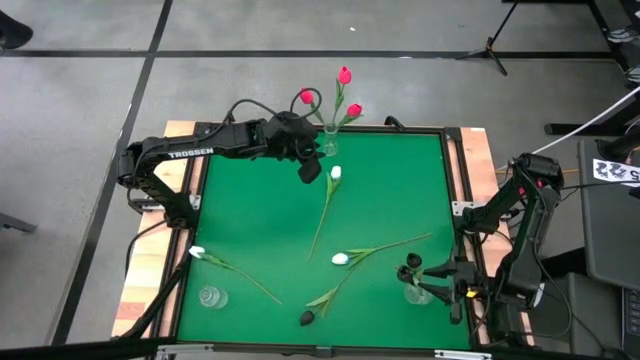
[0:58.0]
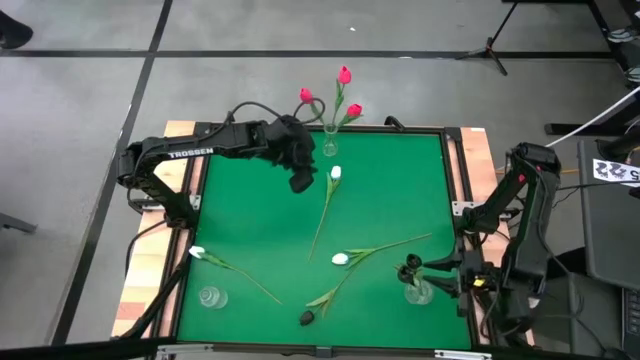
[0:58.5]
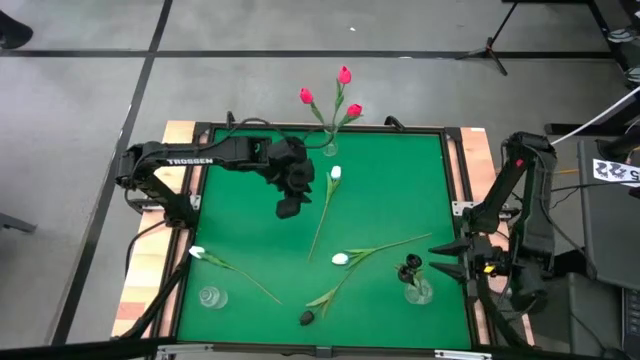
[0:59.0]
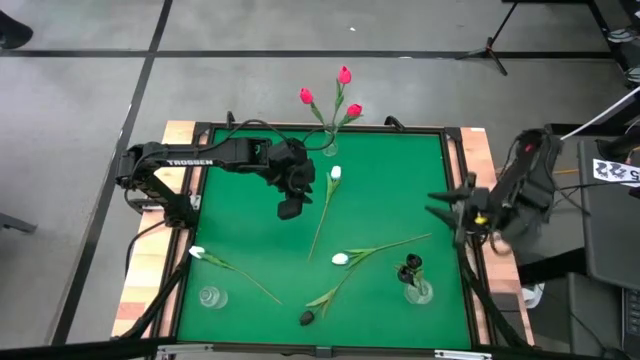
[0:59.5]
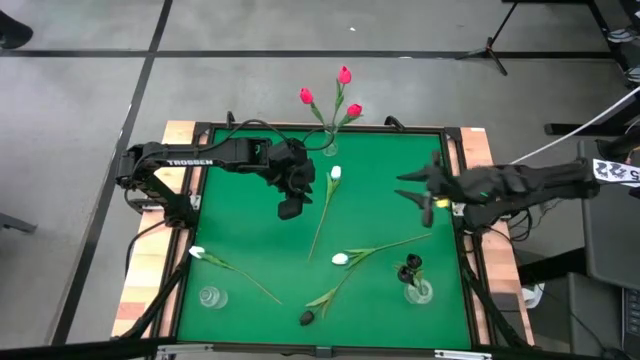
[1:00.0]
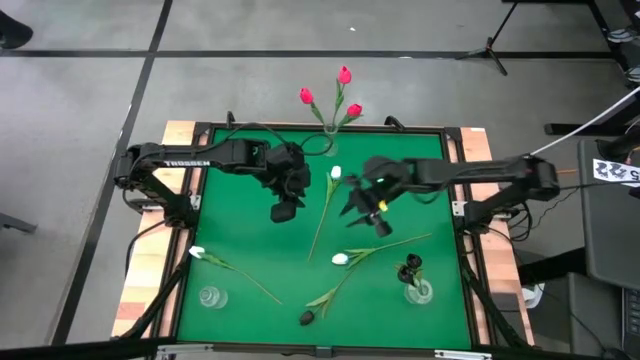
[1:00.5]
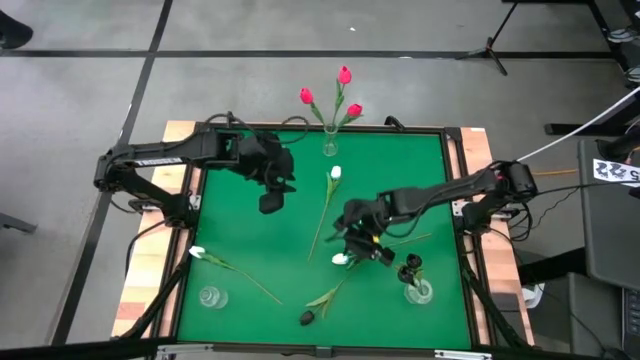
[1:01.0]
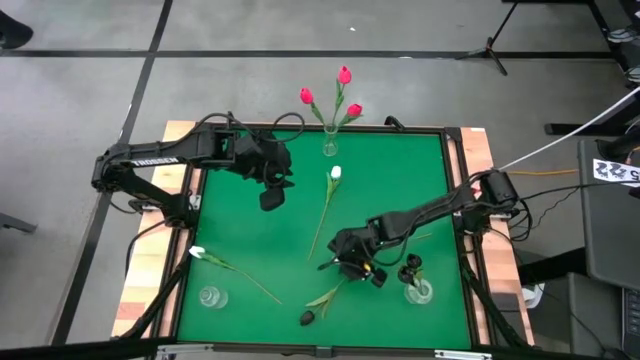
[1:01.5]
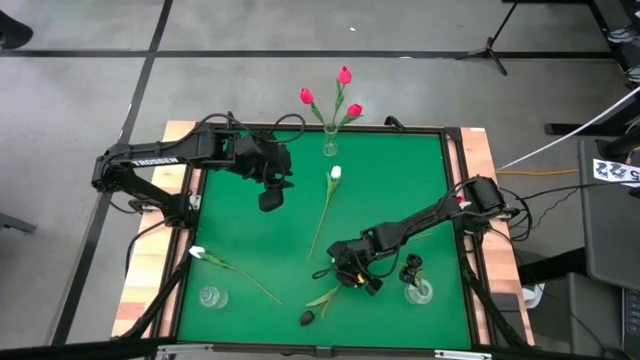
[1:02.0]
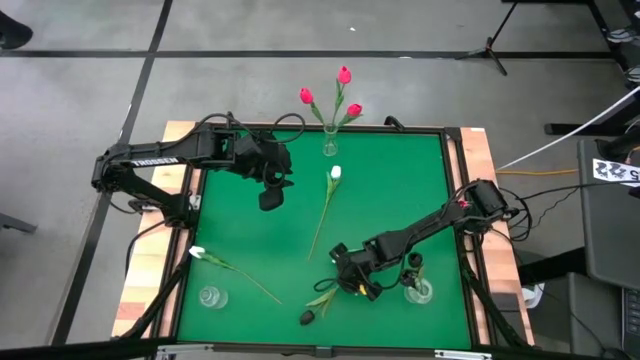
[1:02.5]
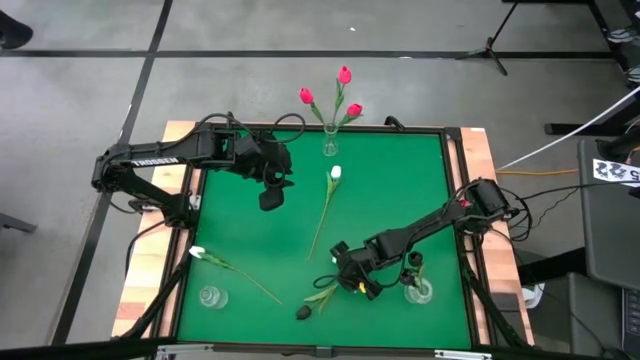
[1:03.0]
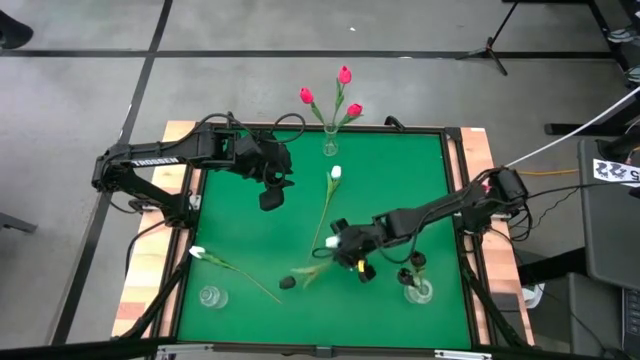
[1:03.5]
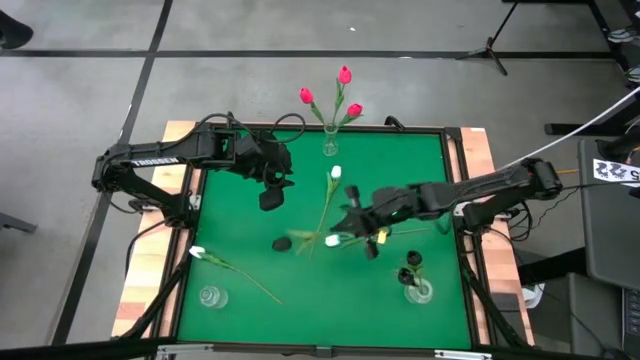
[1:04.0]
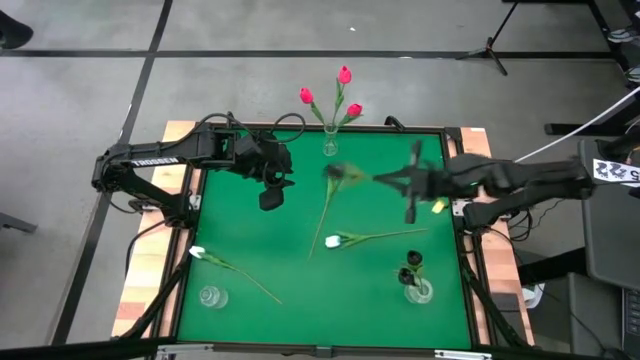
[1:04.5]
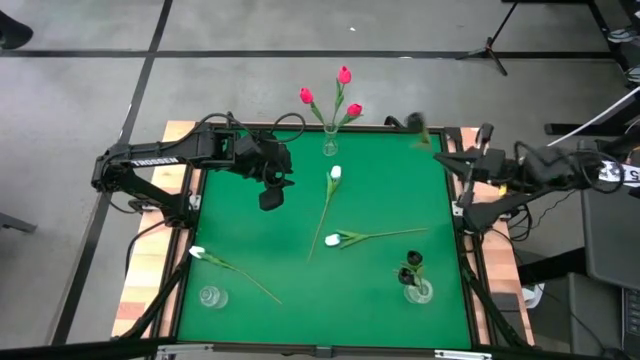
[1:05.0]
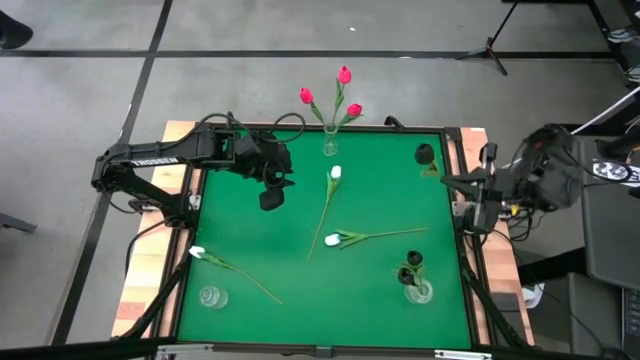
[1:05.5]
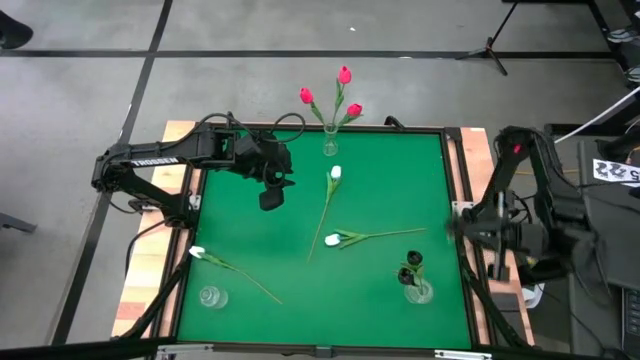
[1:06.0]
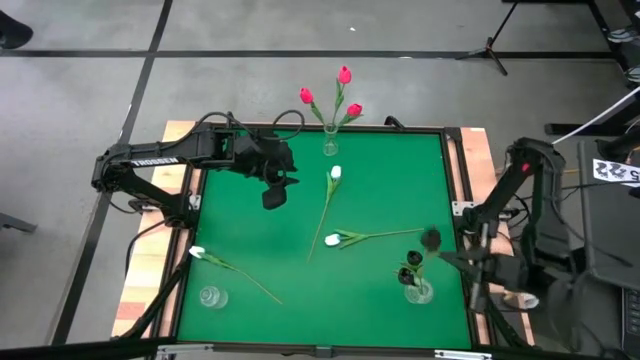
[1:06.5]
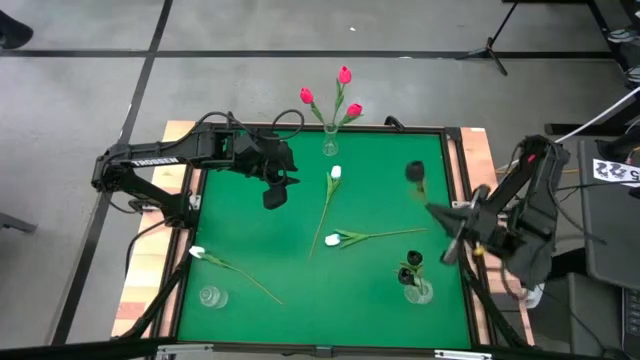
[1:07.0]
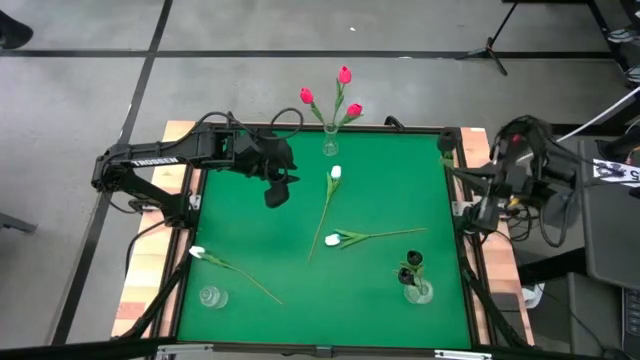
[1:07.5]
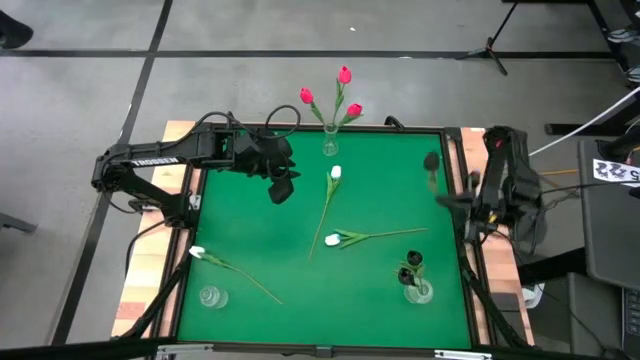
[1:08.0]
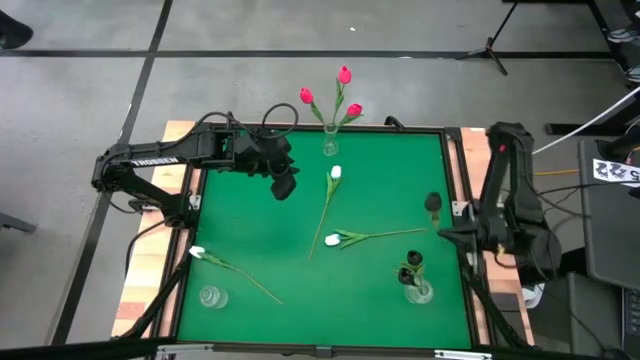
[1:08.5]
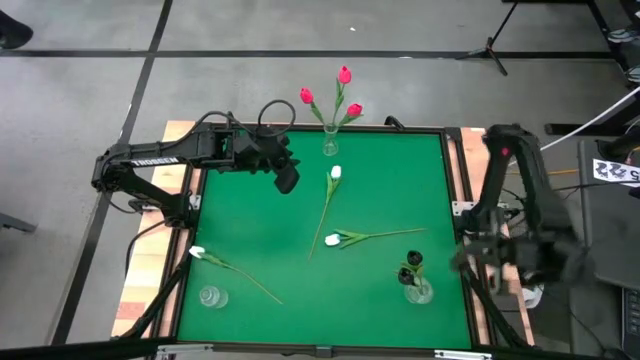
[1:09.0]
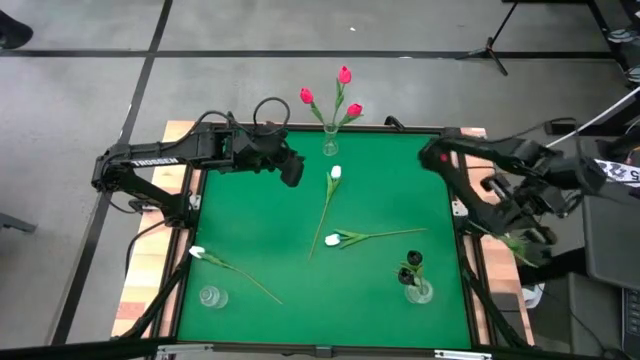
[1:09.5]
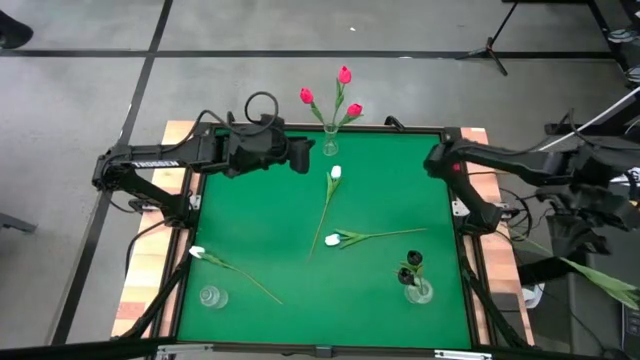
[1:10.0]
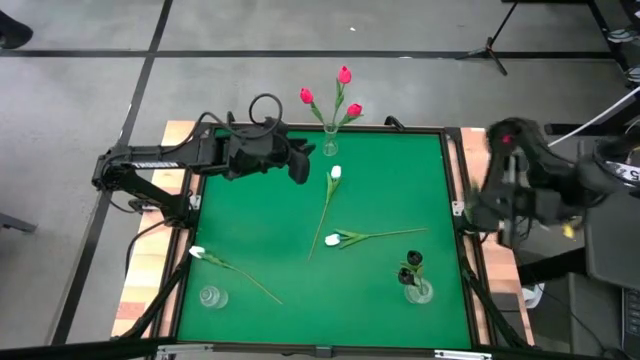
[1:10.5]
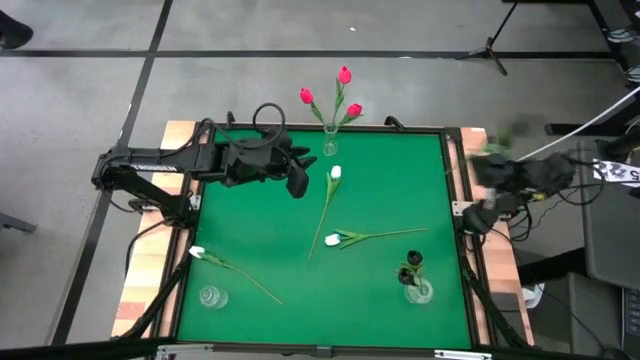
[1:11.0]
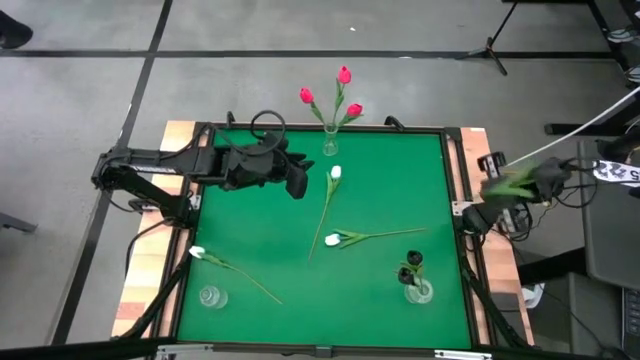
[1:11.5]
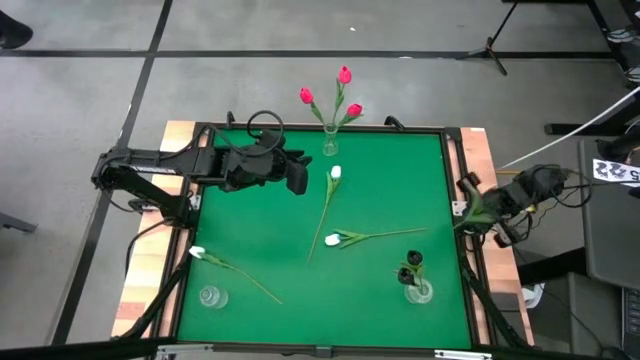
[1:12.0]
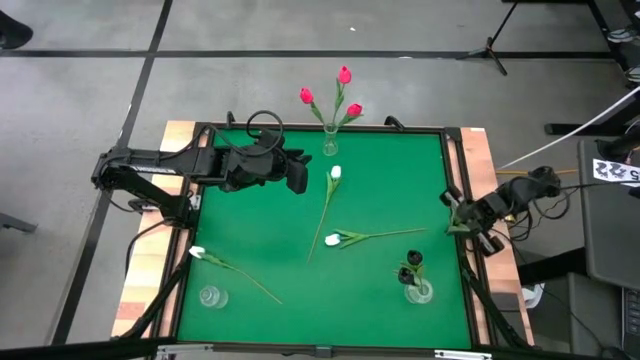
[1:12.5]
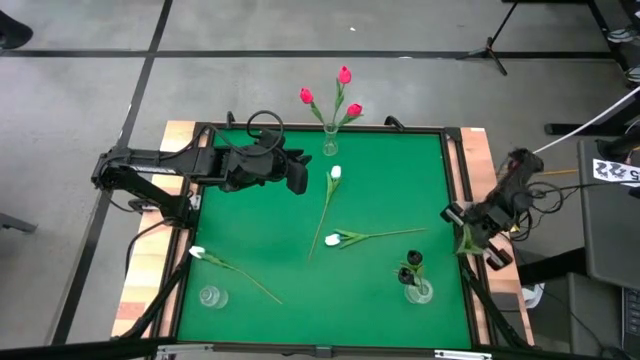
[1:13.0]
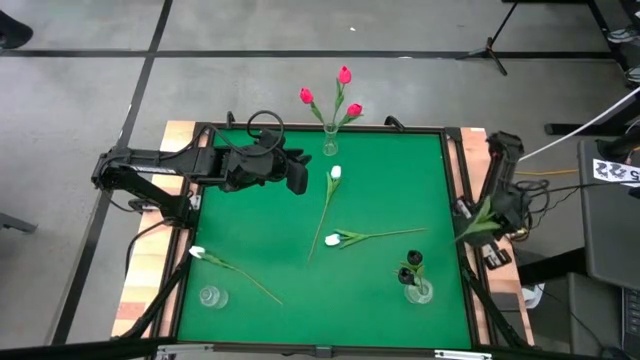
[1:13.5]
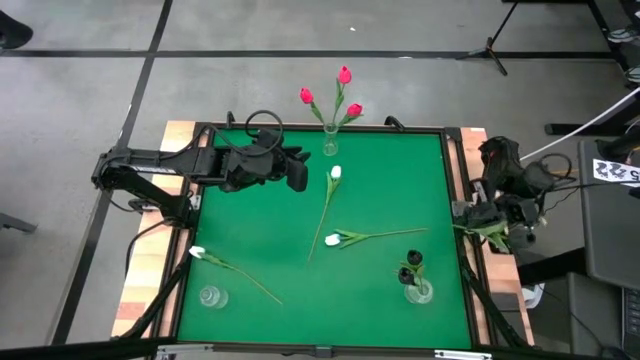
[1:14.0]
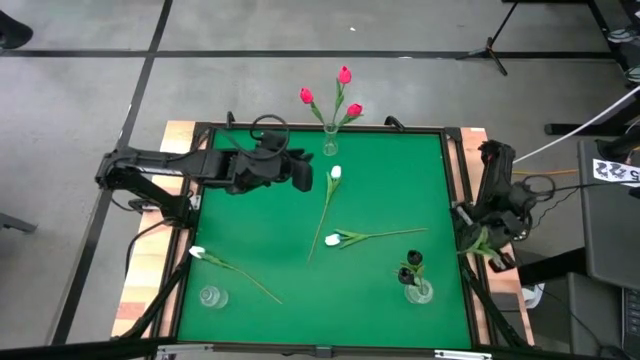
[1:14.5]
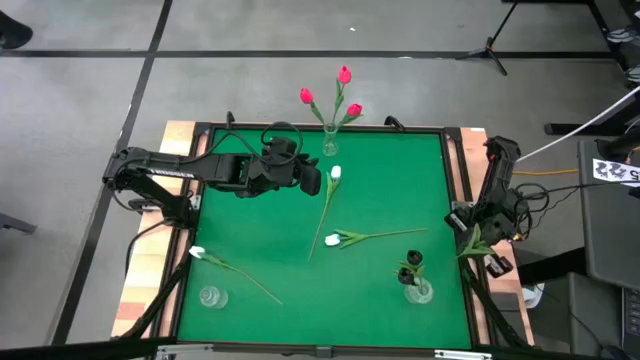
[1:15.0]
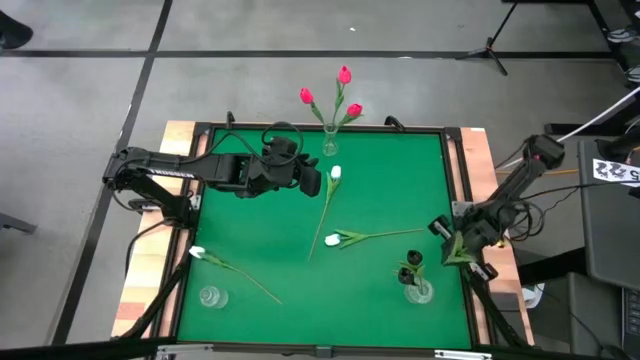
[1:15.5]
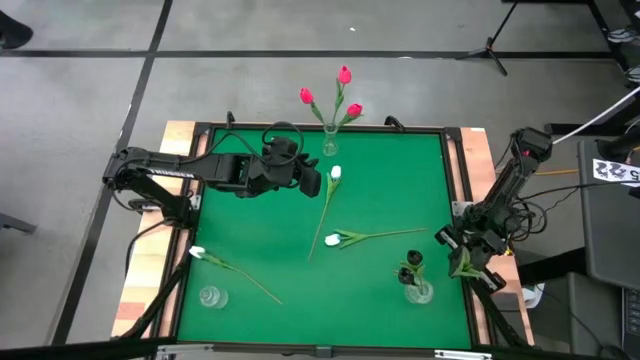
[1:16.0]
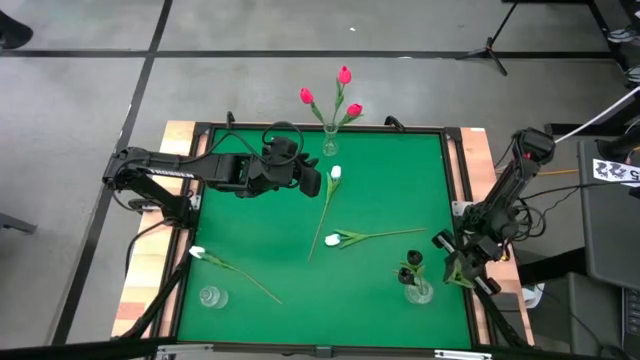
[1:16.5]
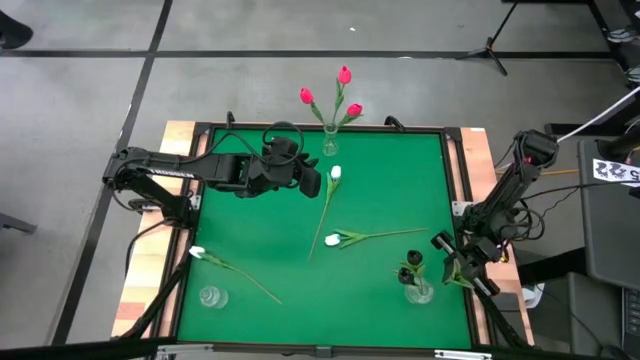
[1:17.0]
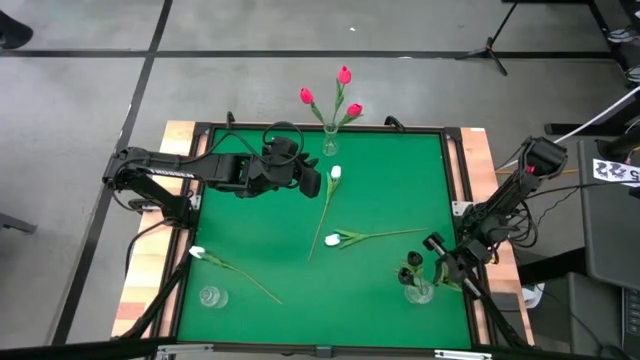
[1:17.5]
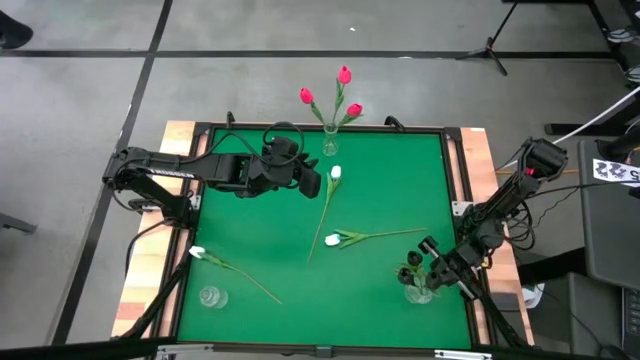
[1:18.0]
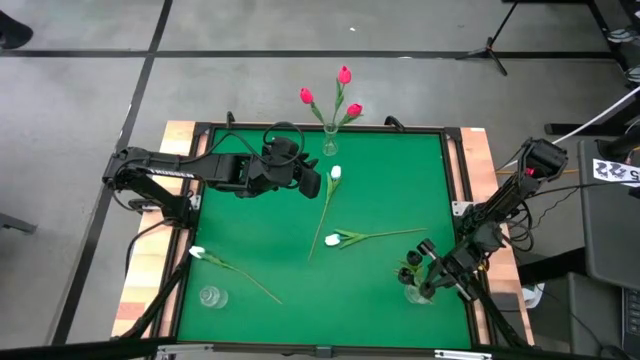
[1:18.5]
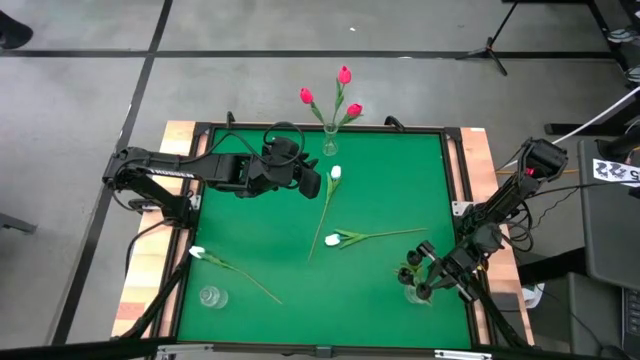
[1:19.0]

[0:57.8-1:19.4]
Task: Sort flowers into vase by color
Put the black tulip into the bottom right transparent vase
